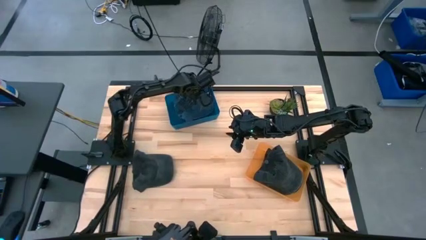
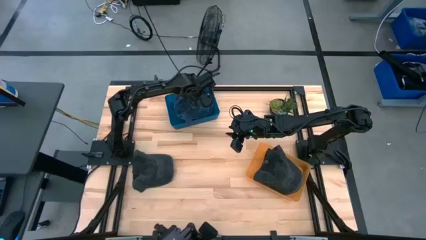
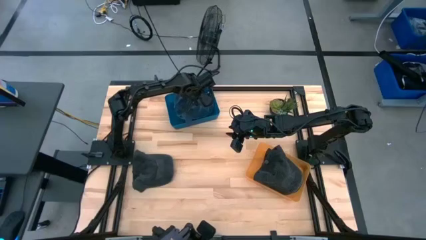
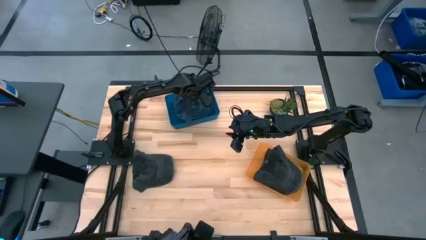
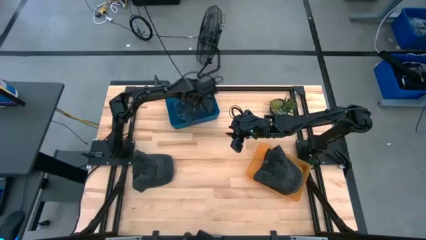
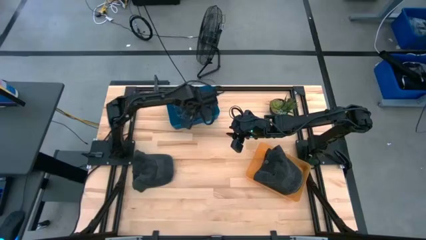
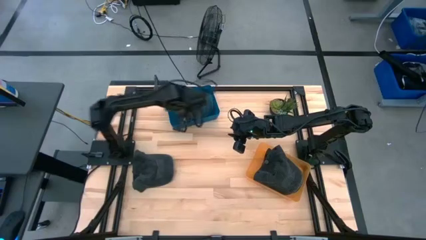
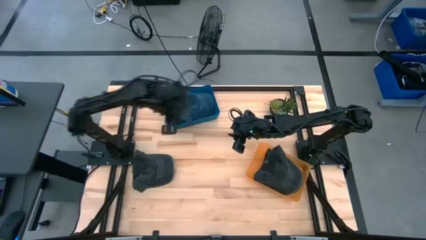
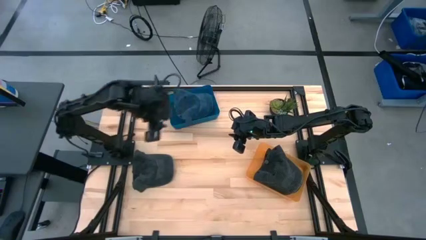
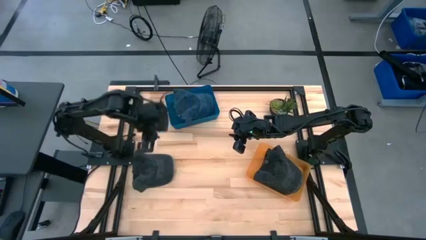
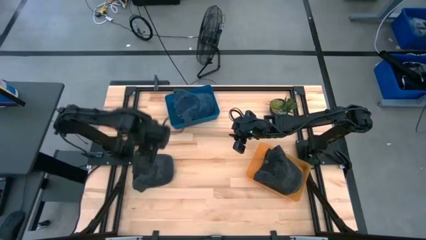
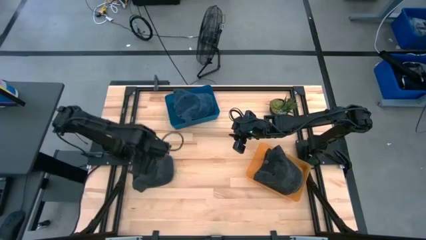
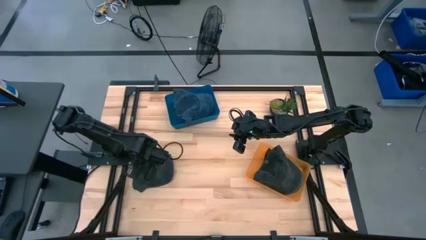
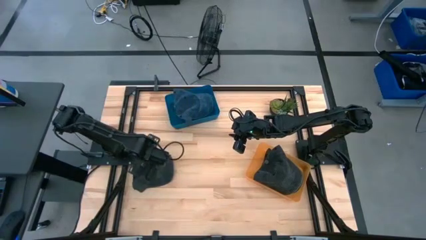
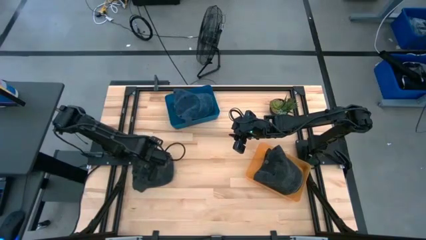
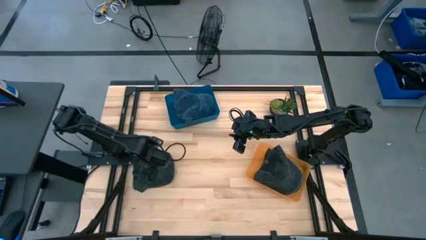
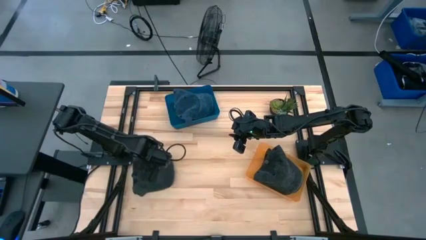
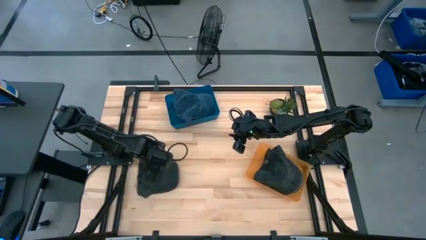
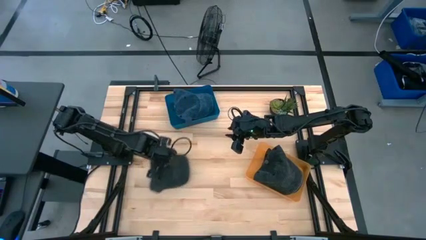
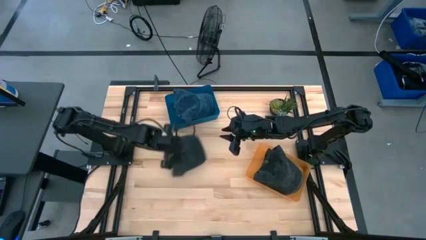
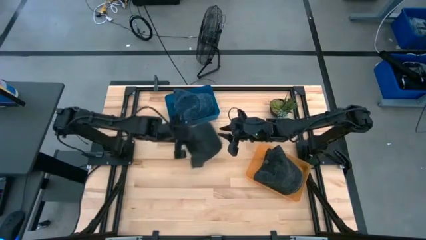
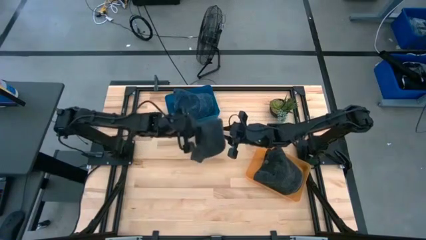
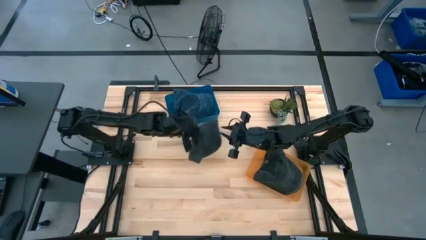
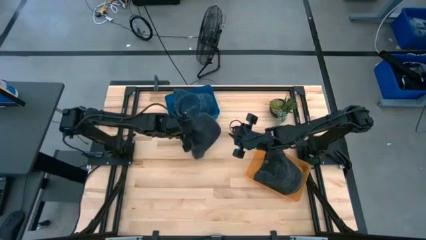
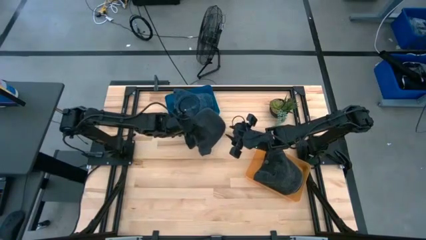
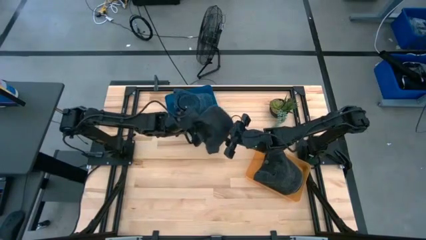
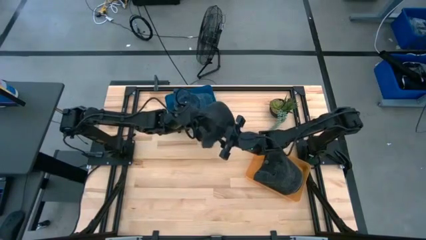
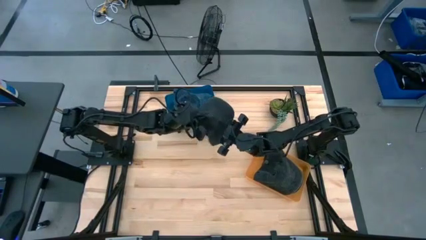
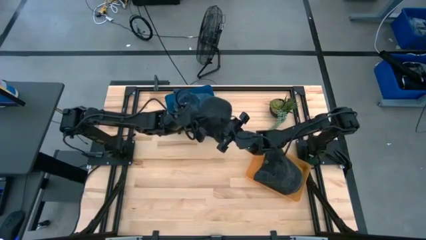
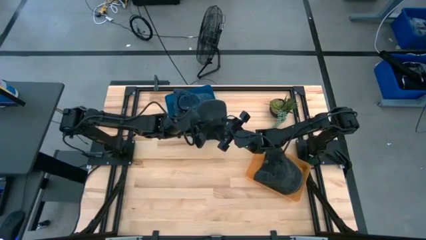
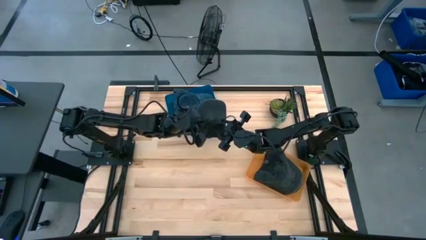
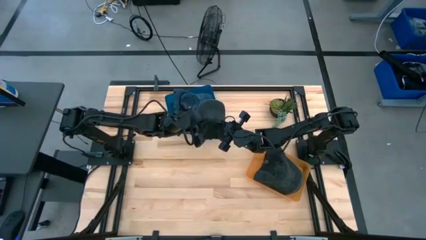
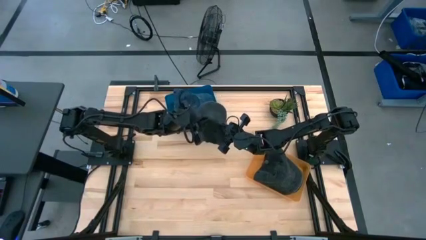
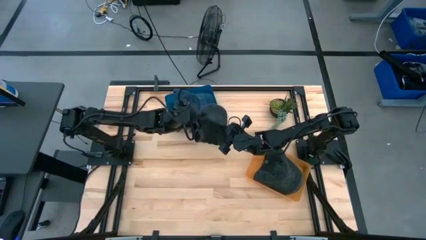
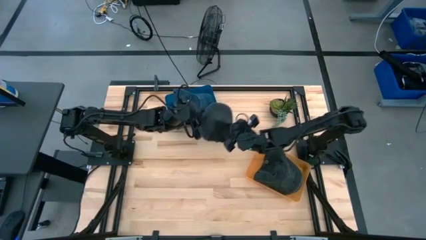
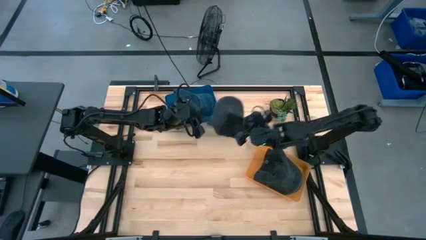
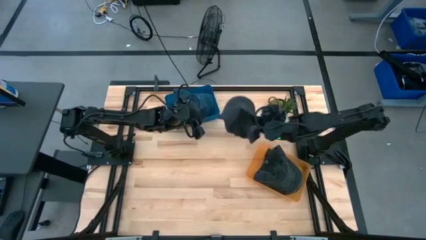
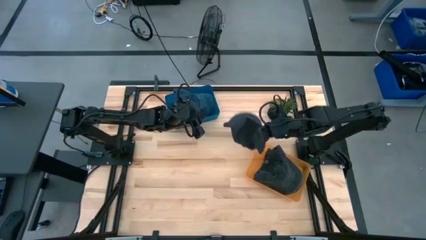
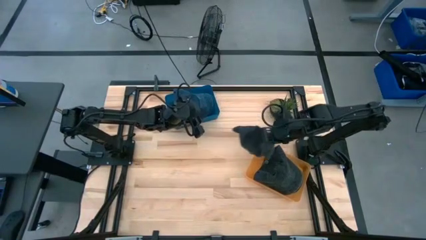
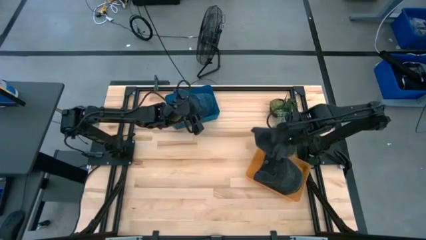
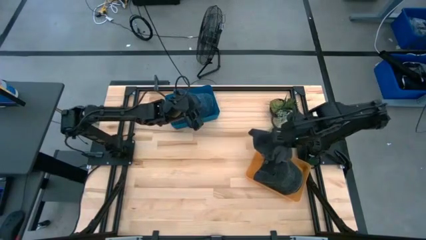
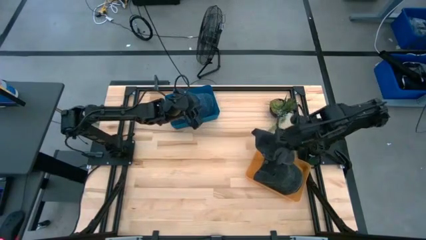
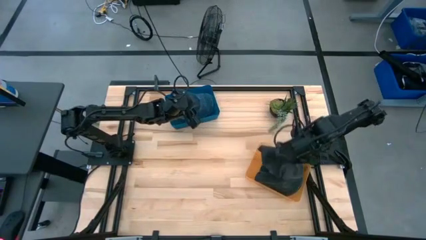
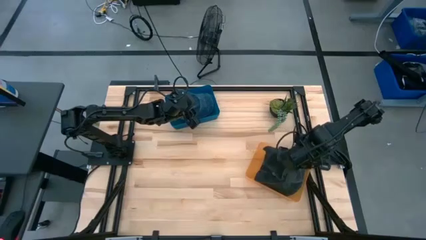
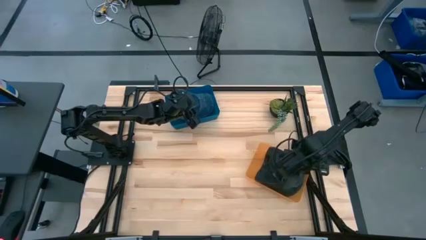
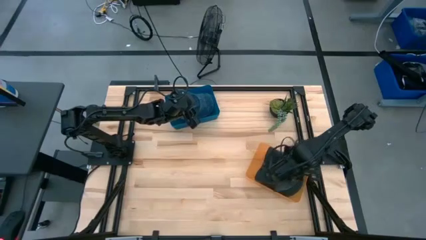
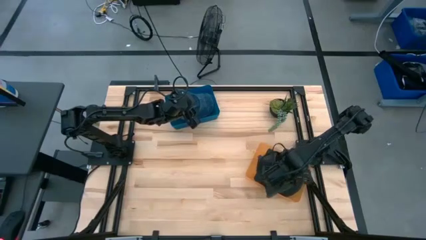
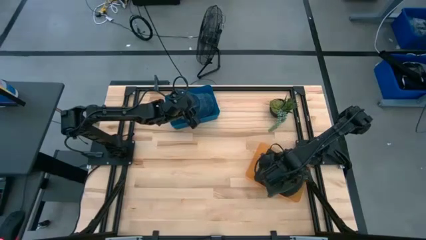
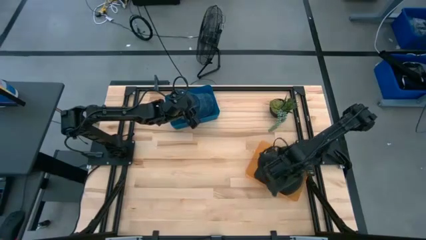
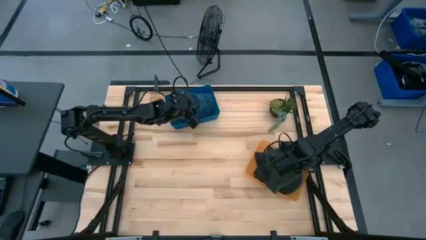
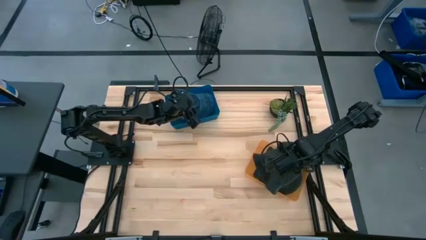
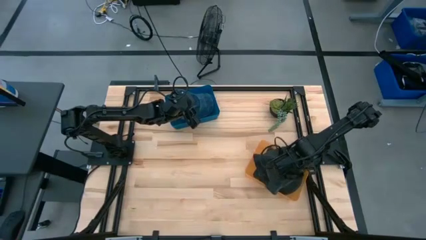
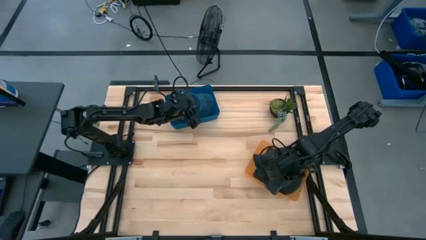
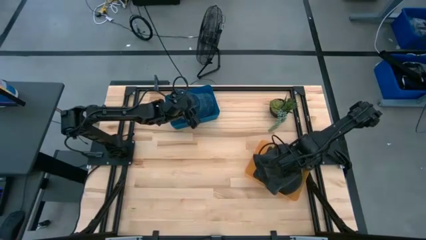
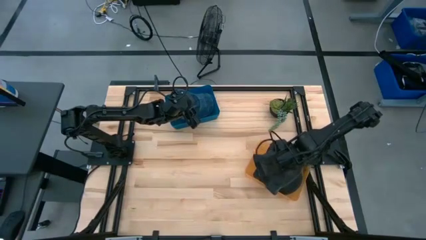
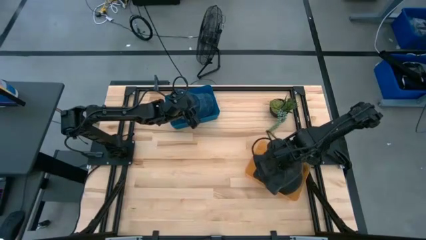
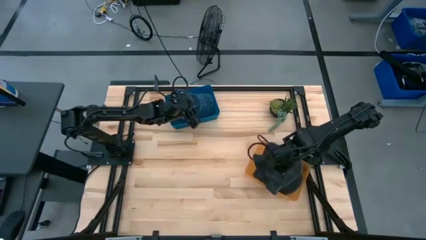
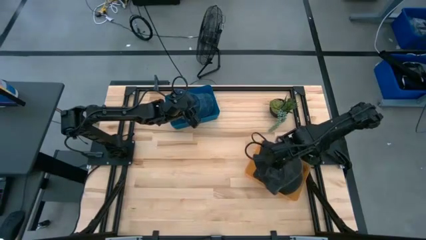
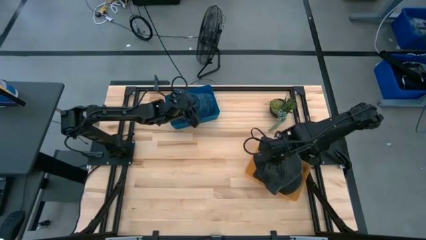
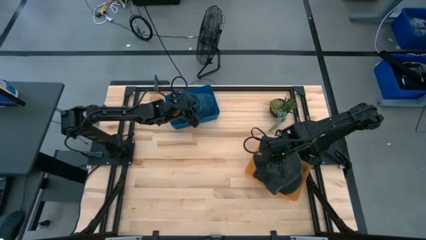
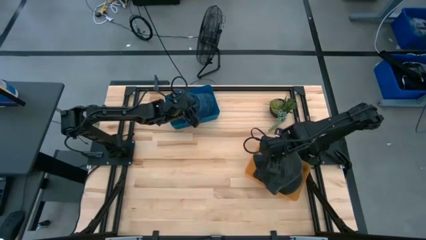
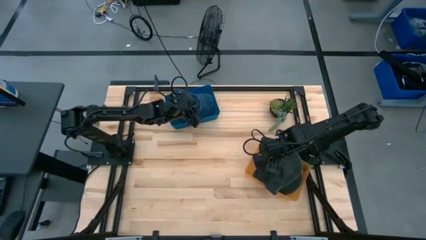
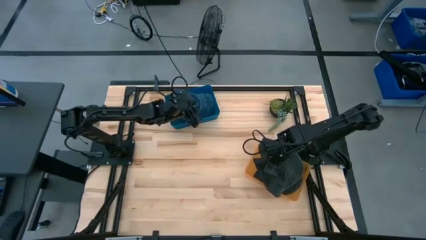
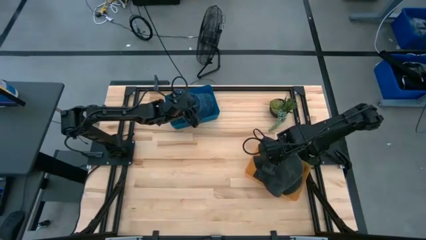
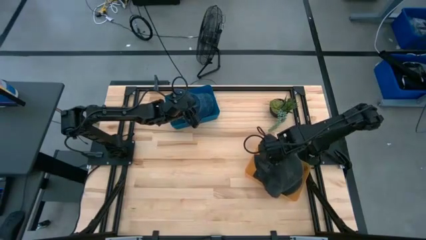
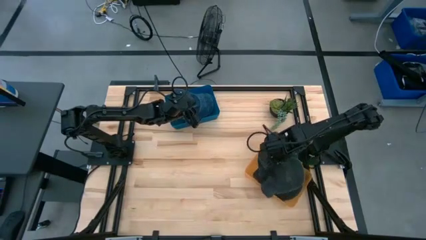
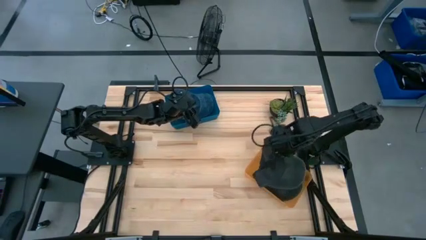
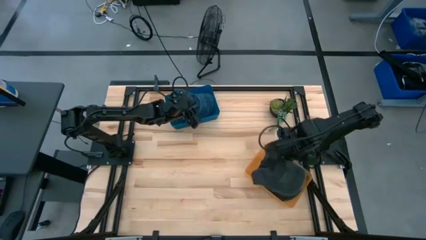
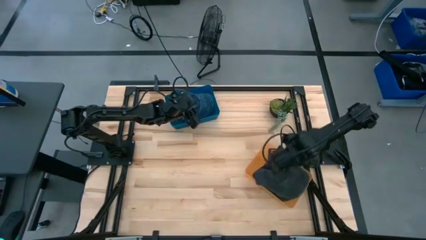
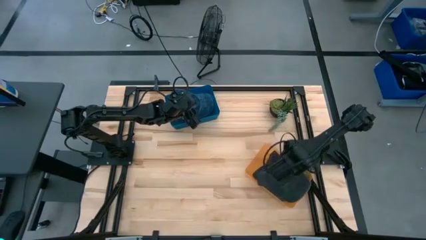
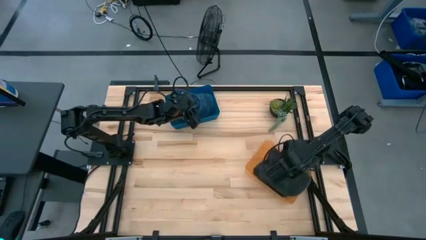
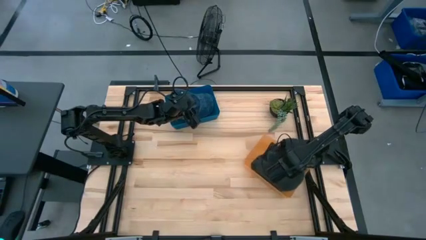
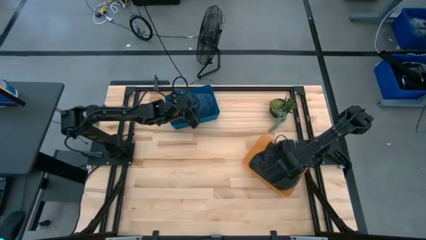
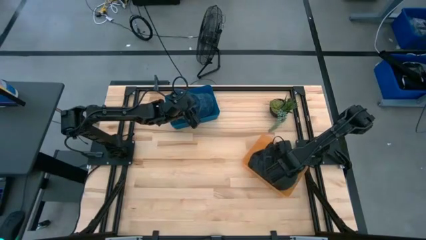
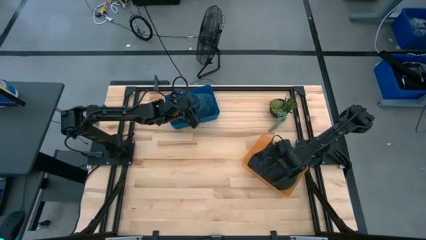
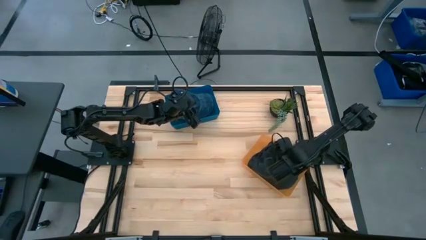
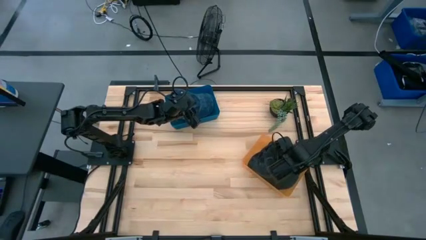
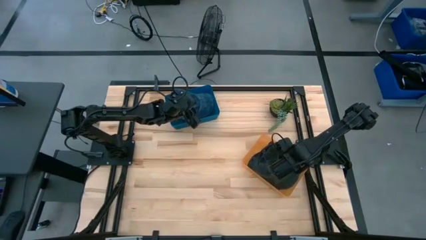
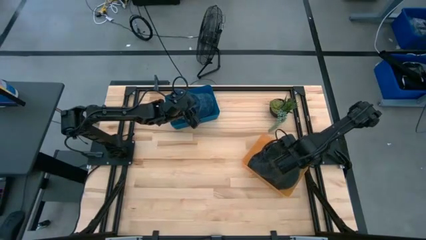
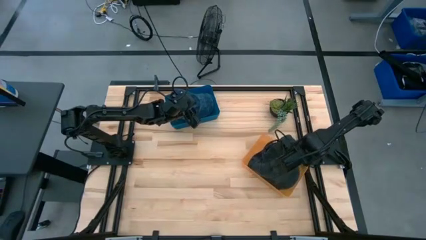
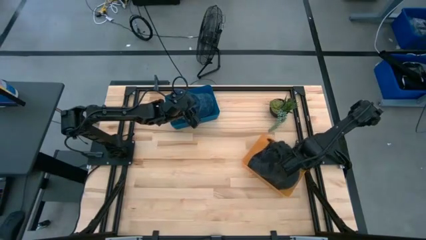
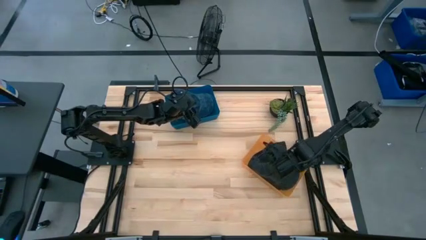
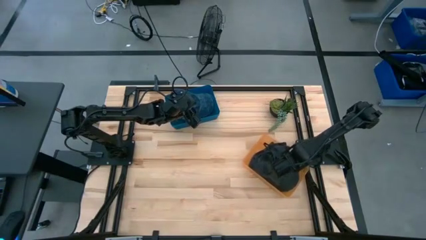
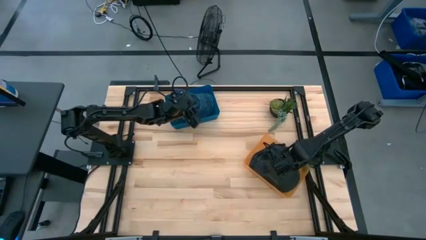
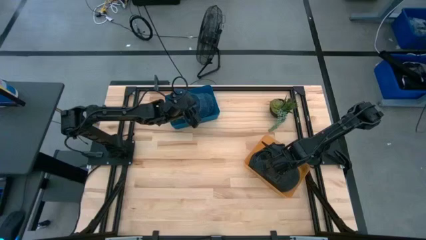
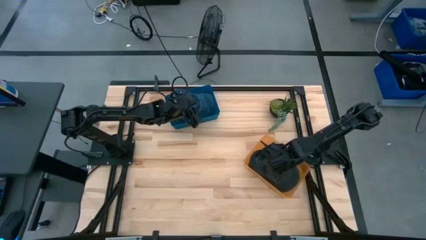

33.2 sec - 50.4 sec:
Task: Pick & Place hat
Put the black cap into the orange bin
